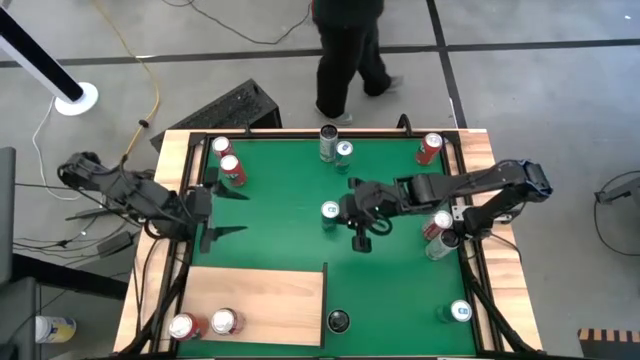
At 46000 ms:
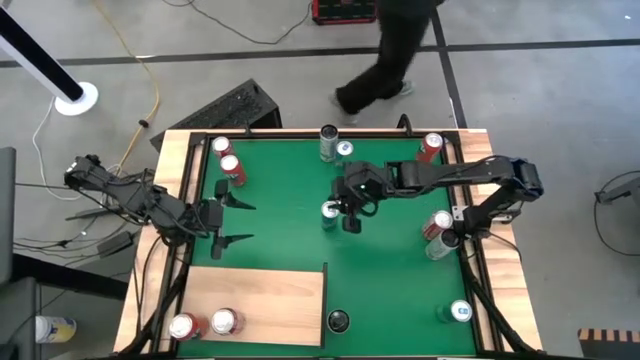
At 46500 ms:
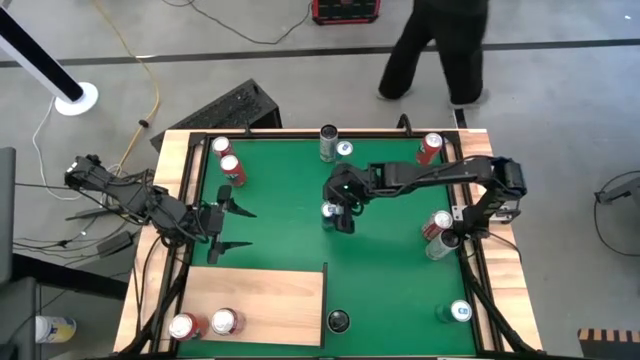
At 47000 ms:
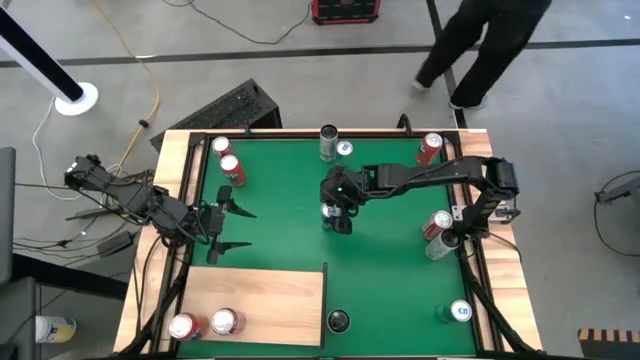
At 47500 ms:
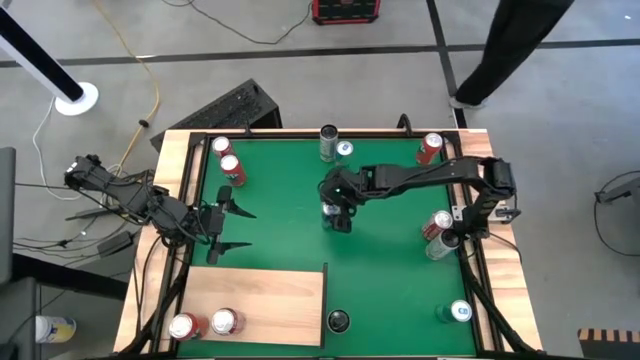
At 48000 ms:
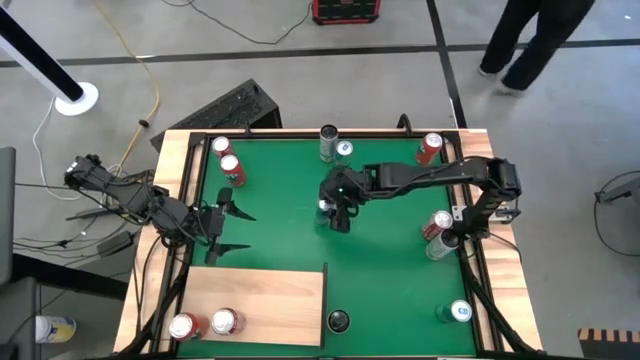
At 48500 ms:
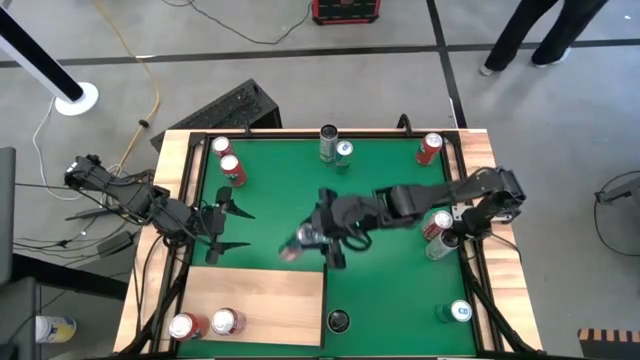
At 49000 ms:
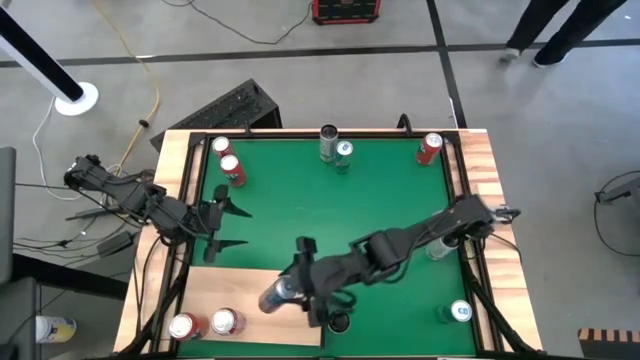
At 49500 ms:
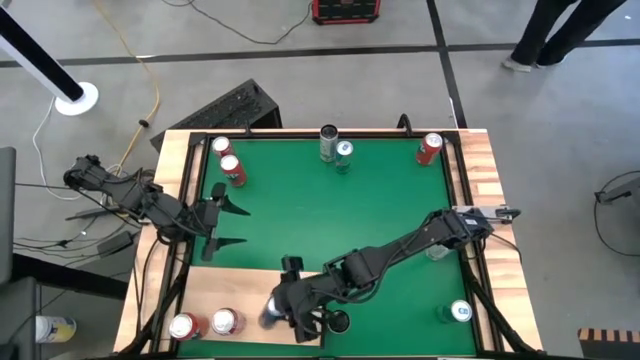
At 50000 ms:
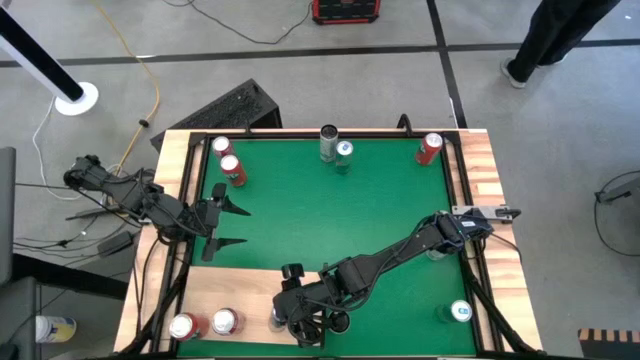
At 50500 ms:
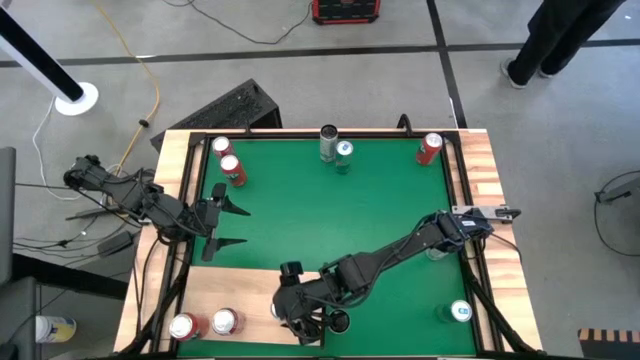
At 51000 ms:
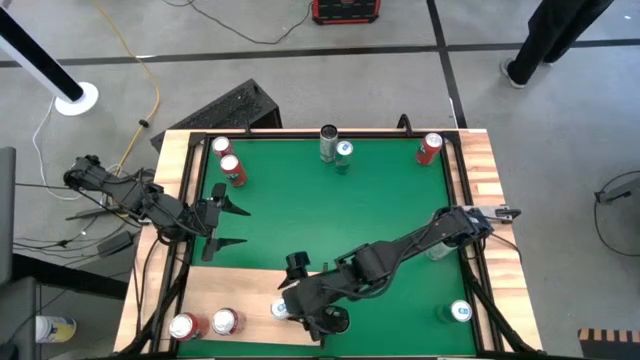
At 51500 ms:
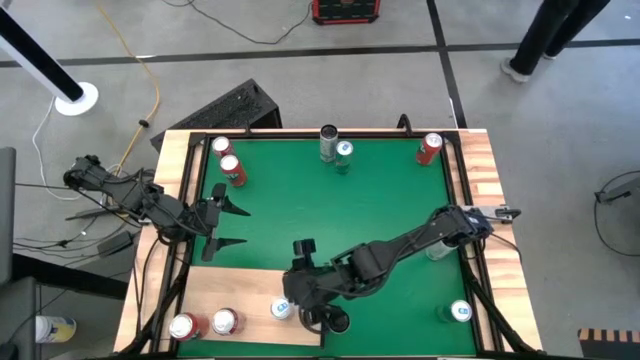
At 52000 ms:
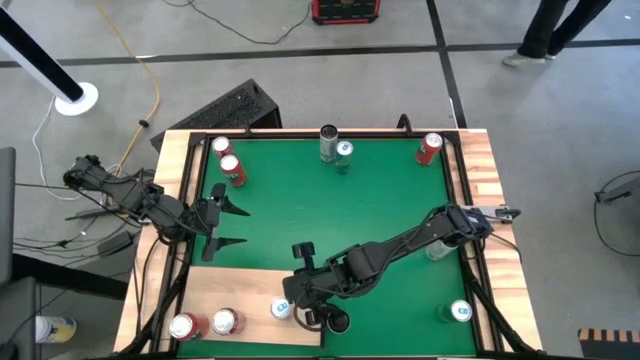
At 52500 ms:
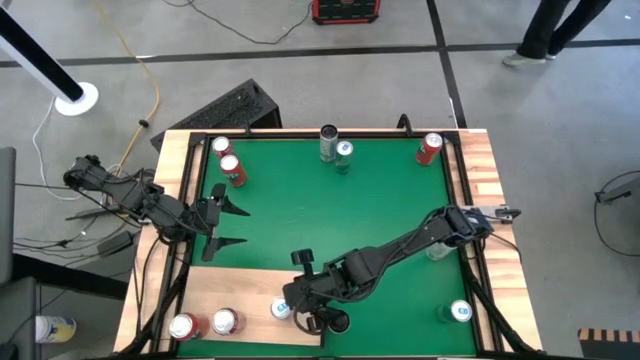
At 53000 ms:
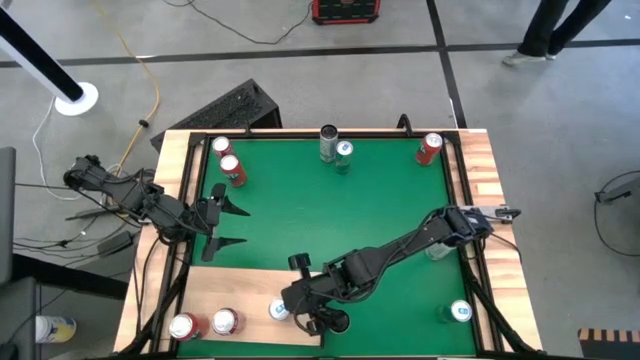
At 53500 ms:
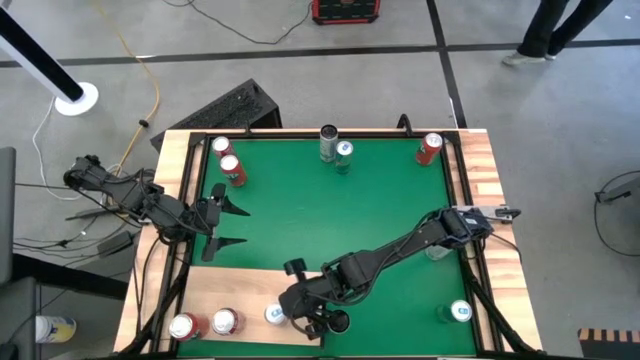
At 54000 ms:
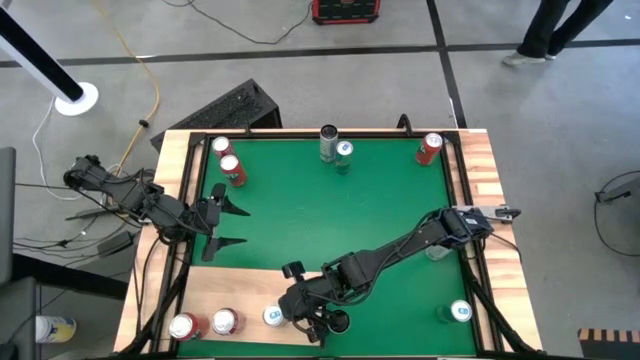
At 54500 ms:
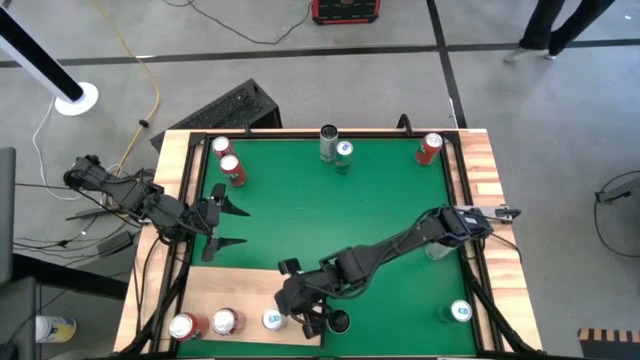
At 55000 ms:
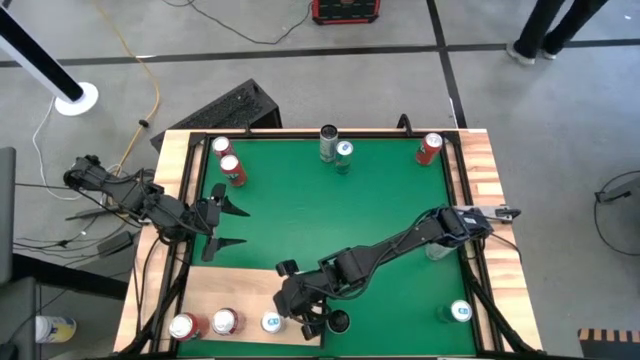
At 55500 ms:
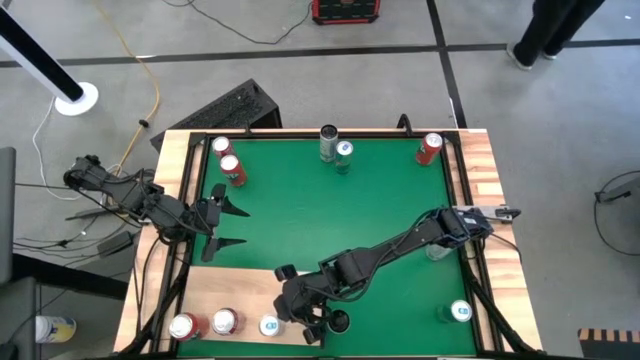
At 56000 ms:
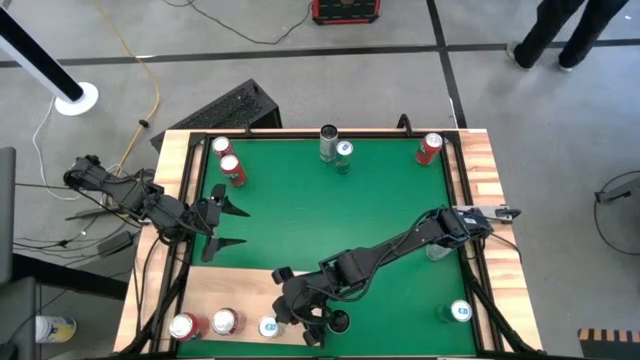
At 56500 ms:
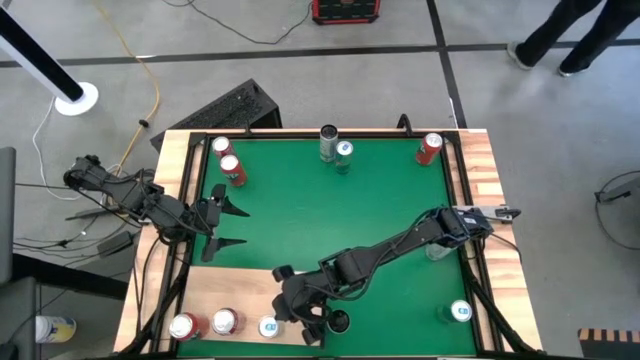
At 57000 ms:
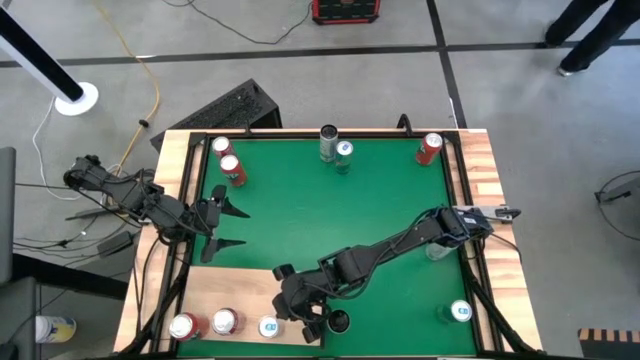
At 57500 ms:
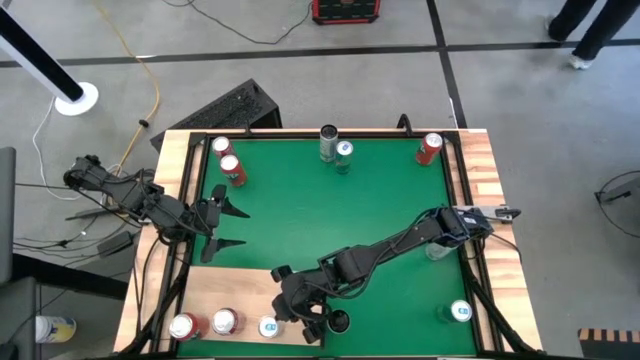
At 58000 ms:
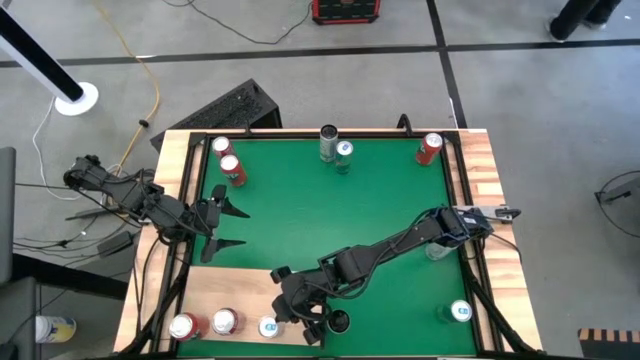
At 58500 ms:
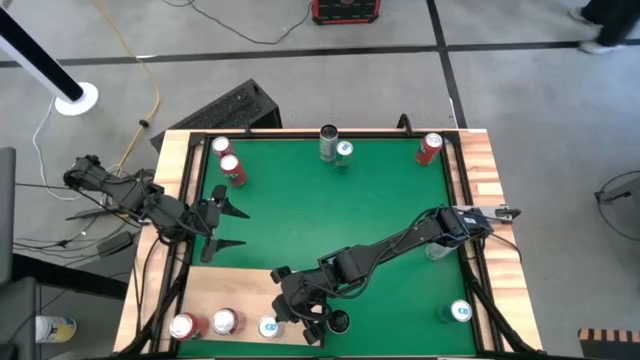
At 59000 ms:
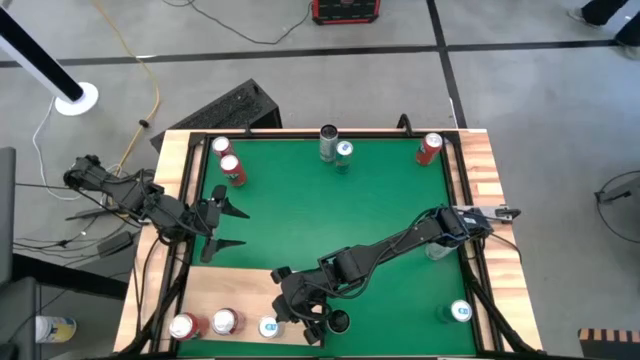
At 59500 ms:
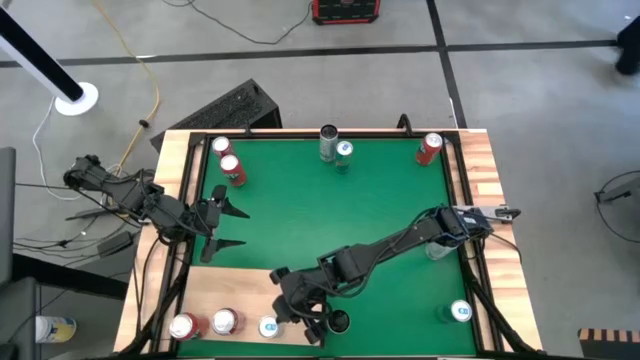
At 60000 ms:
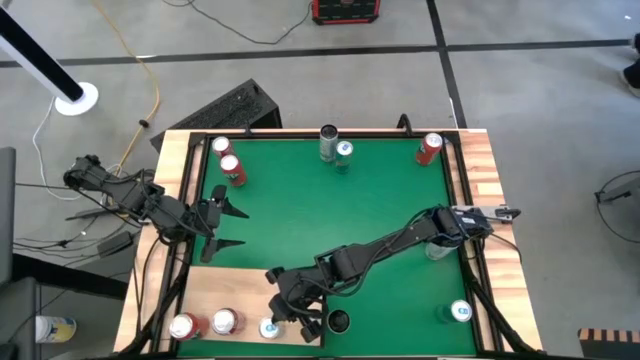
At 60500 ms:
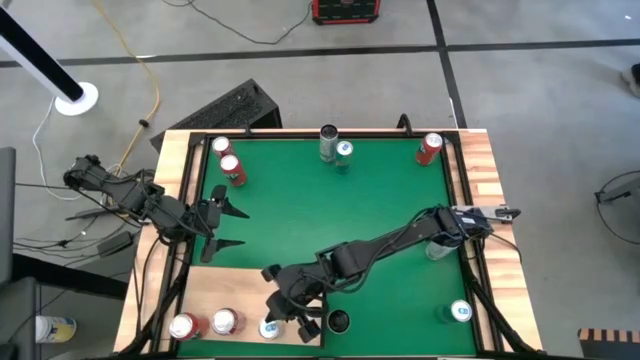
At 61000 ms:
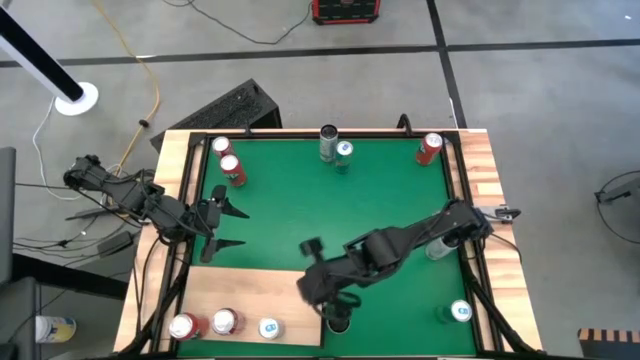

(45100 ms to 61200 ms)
Task: Place canned beverage on shelf
Put the middle blue soda can on the shelf
